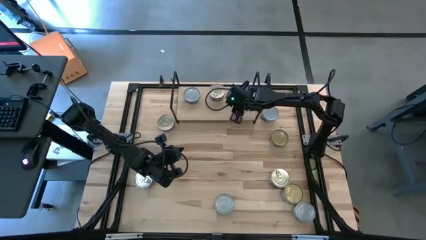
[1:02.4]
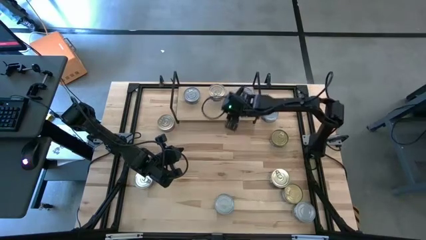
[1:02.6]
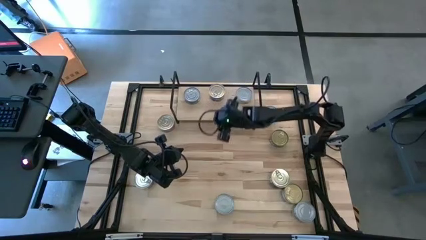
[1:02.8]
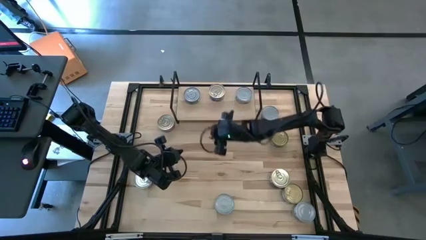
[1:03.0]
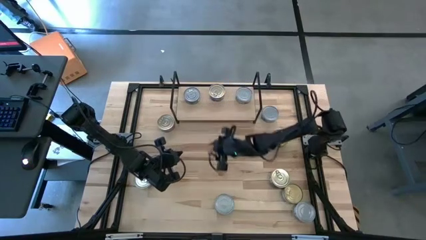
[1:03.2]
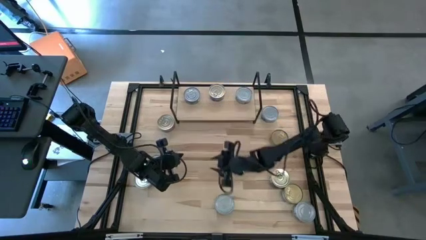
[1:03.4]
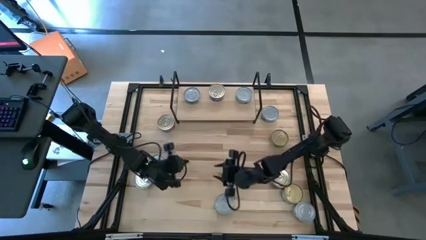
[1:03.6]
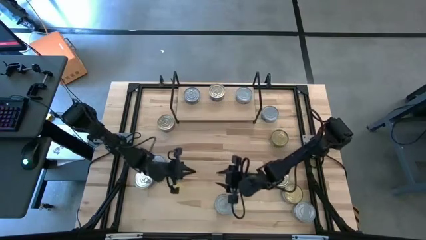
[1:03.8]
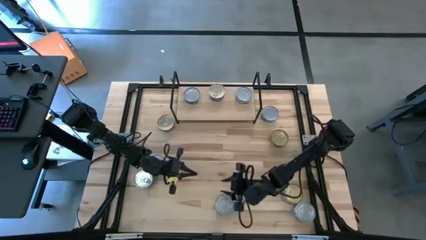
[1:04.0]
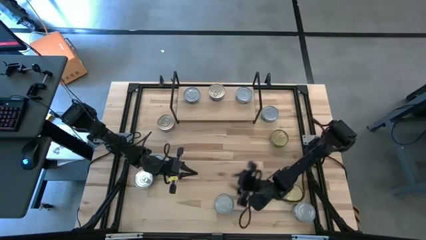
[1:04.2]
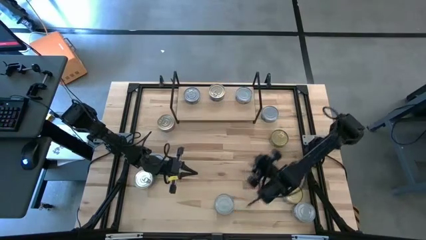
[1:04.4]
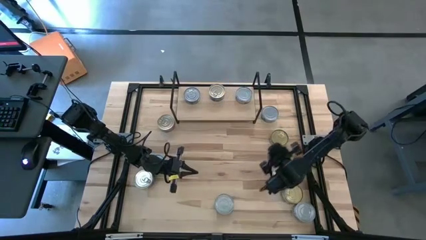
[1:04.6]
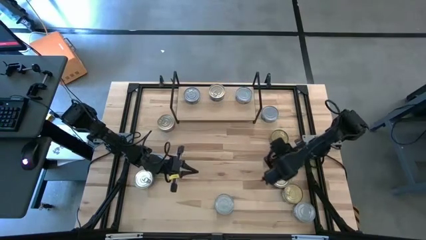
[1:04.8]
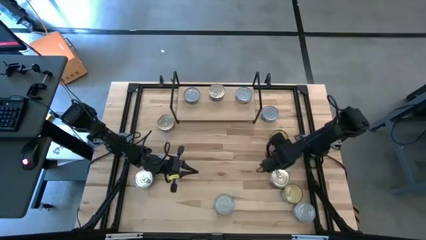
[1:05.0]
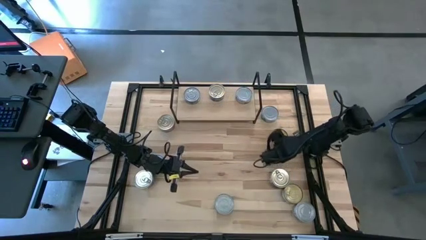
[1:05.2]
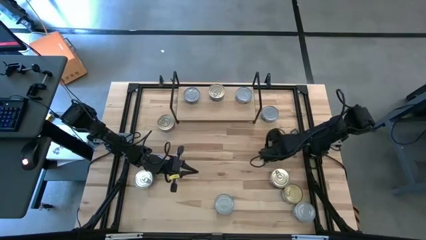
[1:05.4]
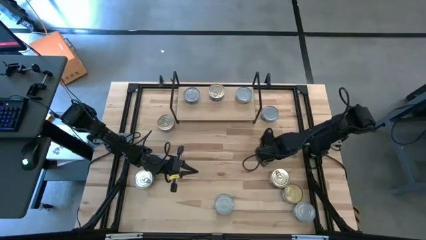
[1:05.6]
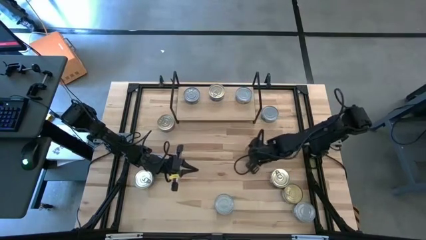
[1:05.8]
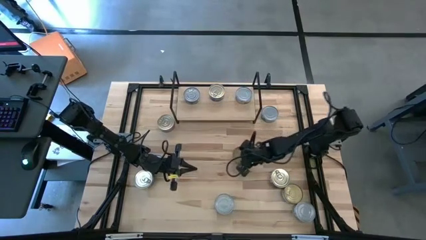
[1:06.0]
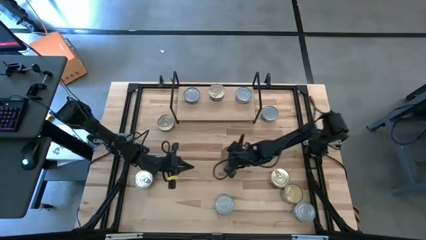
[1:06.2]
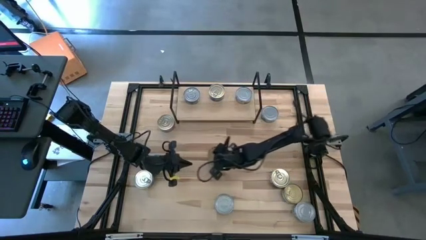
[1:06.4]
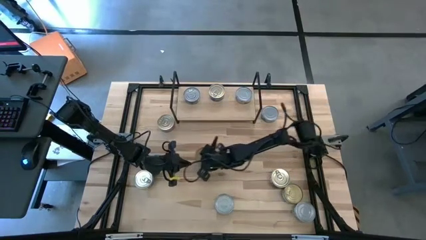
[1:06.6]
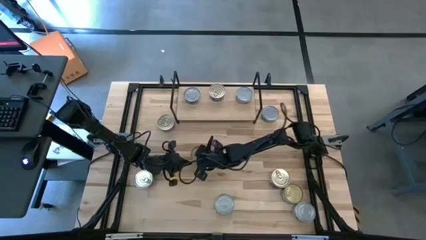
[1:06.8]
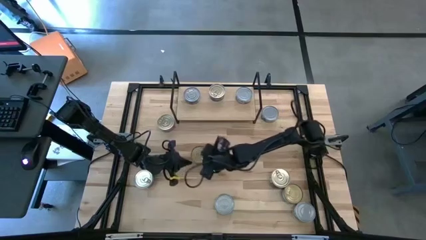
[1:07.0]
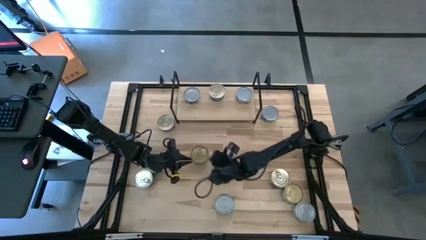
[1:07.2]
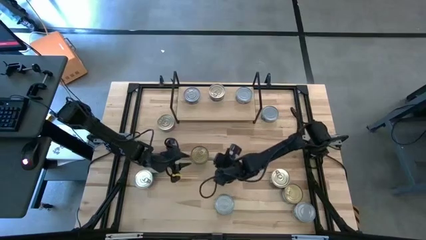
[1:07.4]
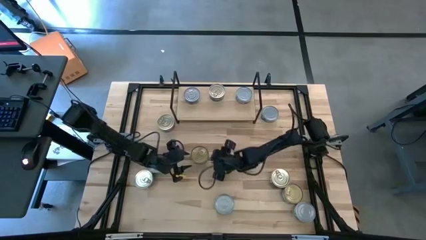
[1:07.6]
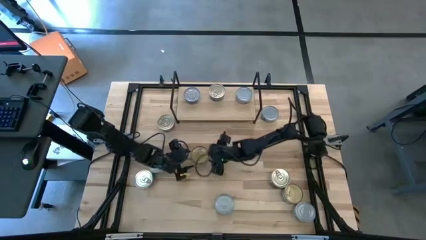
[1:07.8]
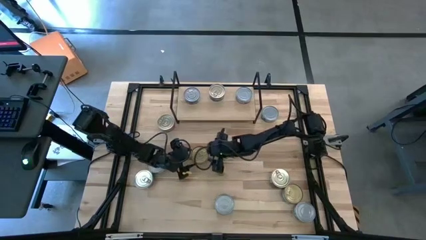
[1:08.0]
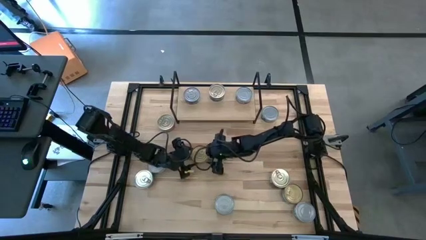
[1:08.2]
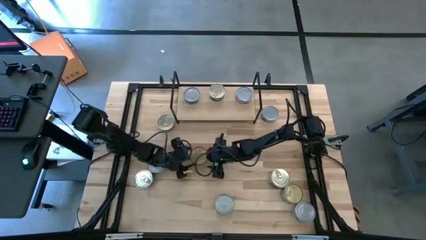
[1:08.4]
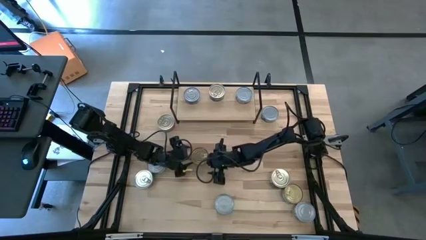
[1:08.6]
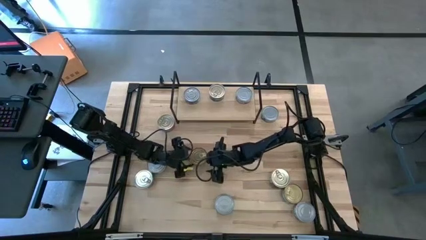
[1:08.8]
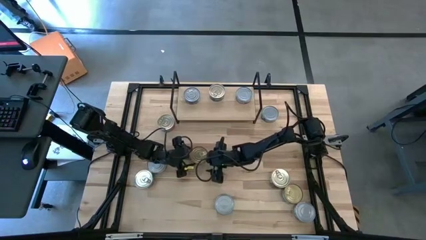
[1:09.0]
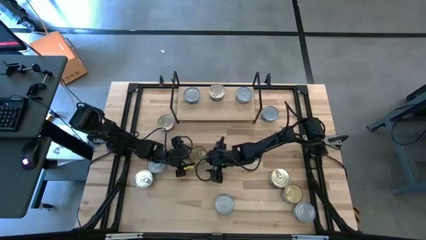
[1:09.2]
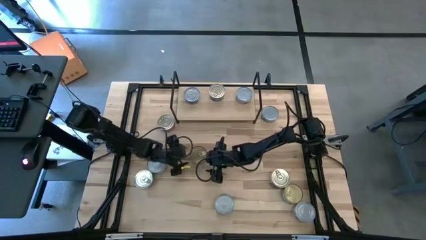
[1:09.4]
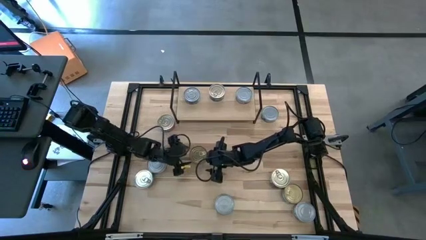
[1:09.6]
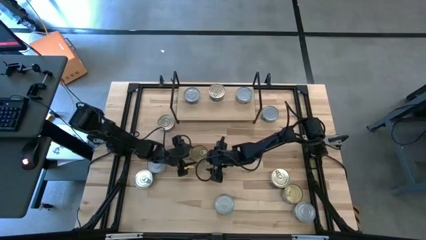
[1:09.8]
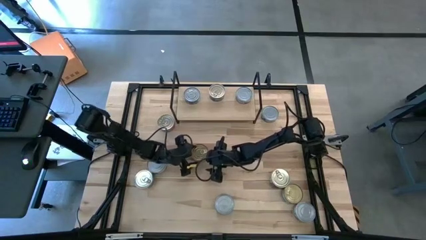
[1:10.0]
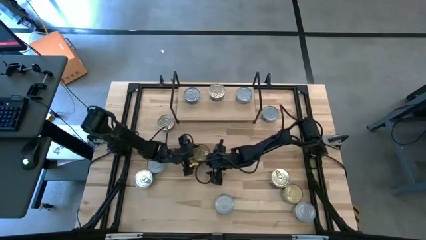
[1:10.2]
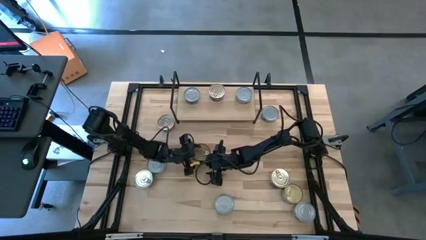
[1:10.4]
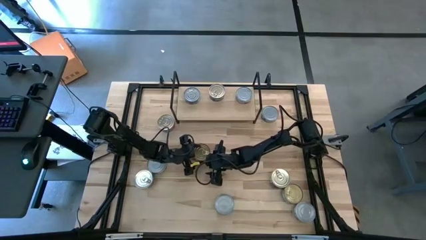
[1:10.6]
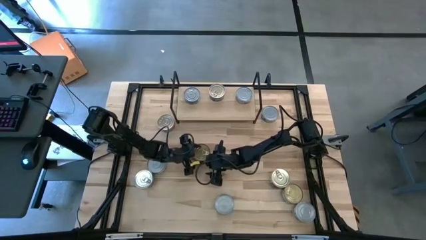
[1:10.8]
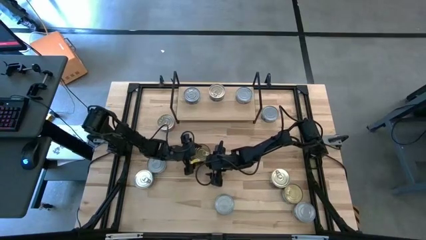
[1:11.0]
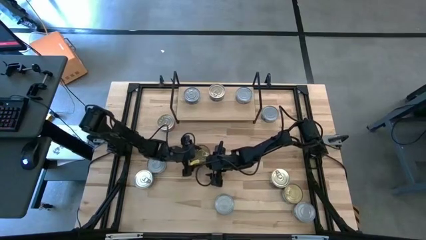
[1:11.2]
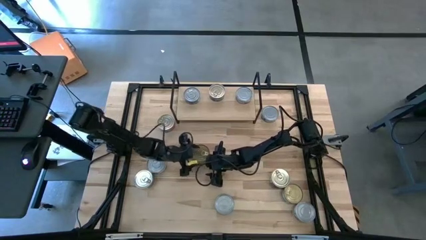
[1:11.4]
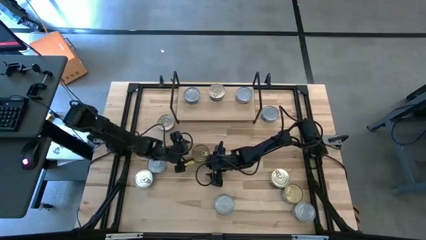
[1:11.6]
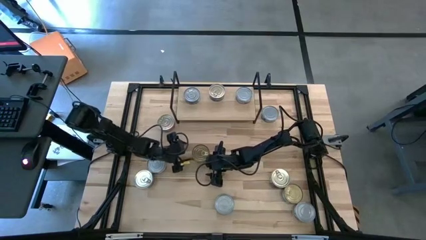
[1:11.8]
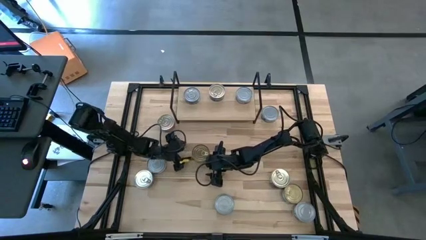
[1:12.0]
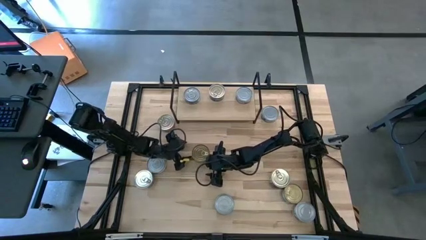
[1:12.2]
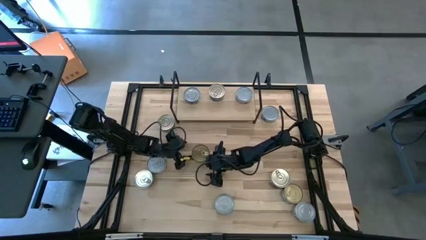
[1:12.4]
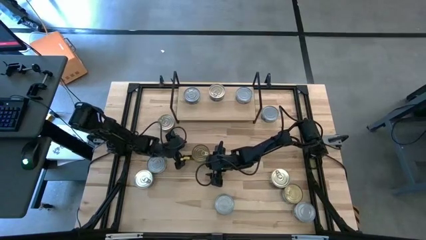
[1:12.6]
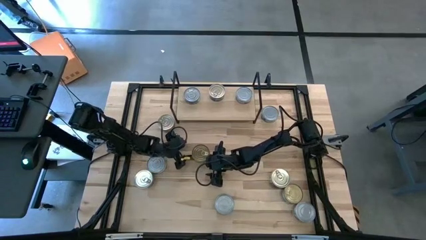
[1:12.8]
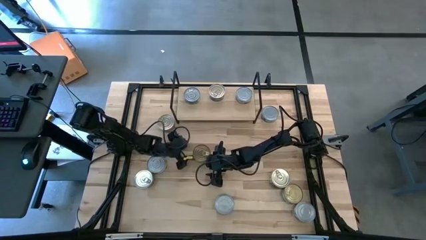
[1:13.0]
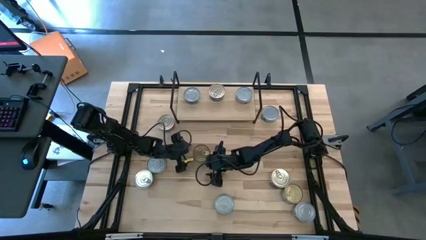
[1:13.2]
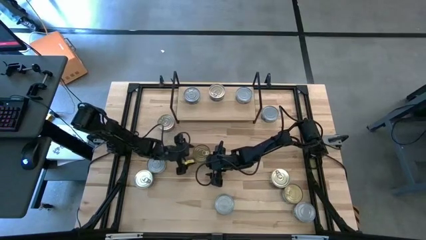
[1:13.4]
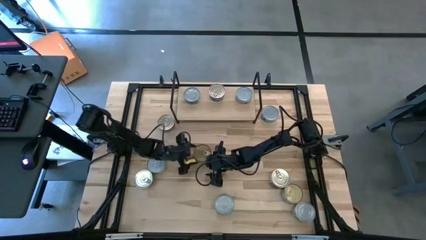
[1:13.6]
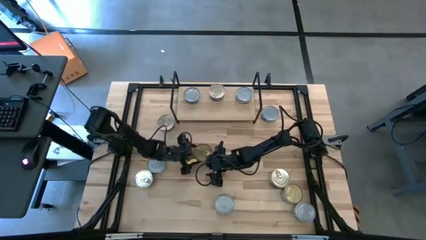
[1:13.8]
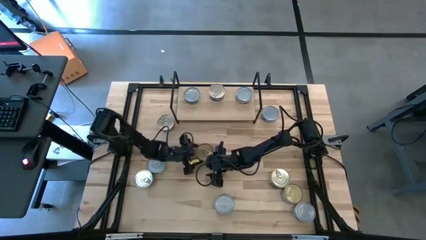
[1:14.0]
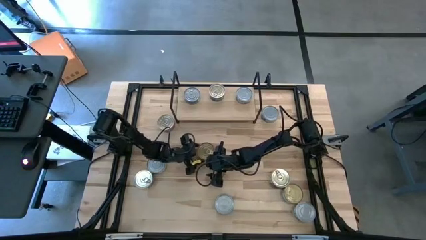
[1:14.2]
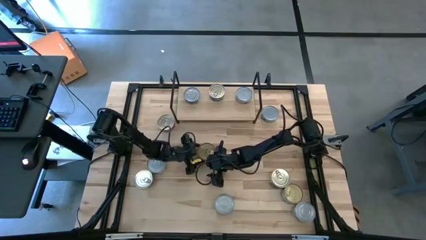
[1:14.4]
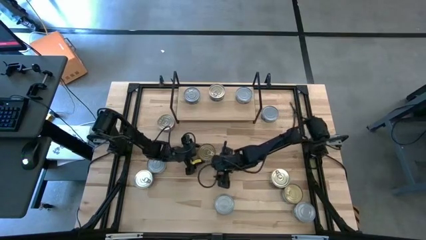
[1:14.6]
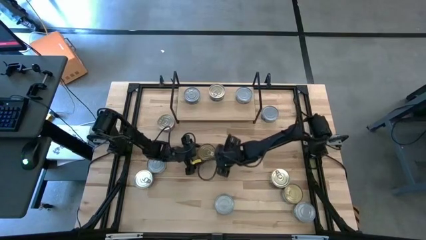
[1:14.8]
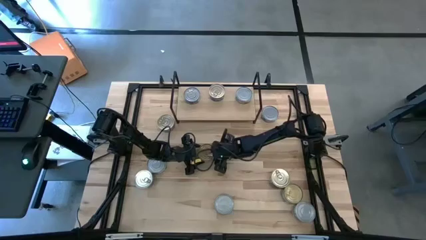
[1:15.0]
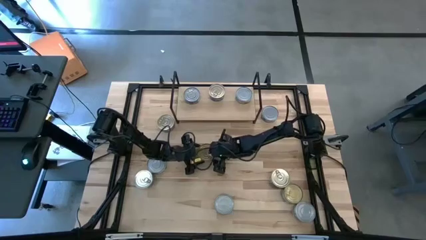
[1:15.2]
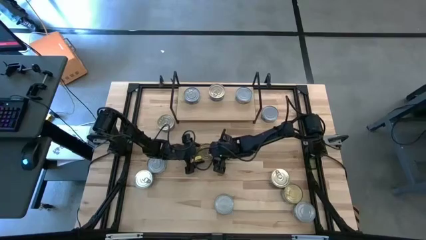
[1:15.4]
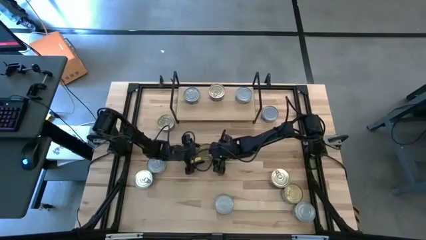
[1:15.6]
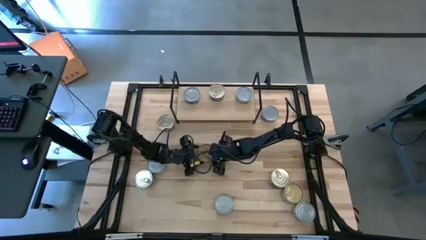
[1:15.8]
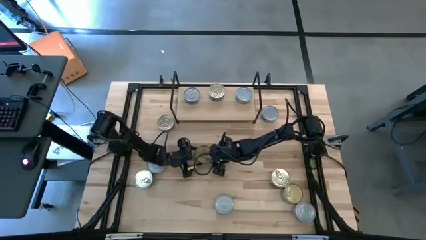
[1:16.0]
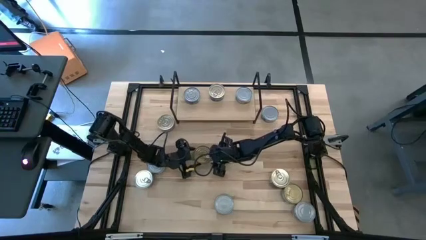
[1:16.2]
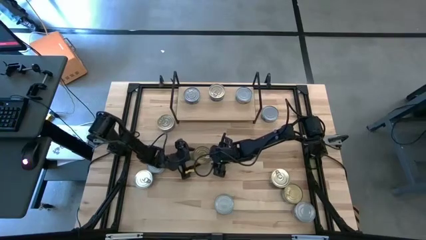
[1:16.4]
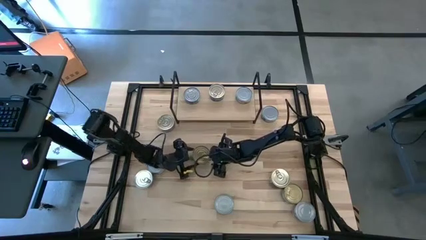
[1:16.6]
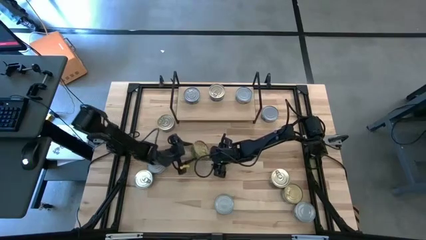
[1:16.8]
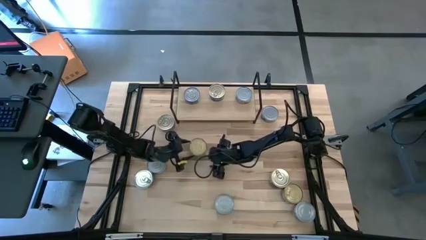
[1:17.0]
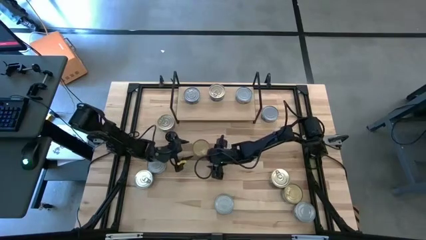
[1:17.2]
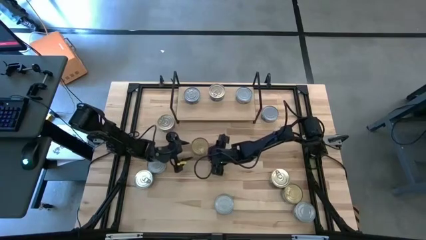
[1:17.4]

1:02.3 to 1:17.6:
Task: Stack canned seafood by type on shelf
Put the top right green and blue tuna can on the shelf

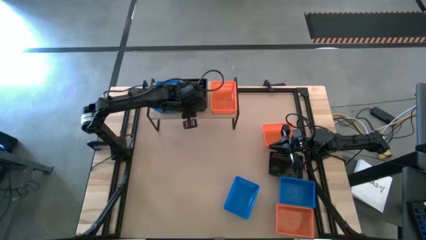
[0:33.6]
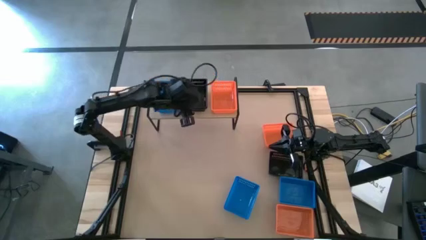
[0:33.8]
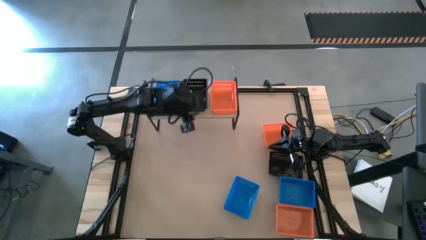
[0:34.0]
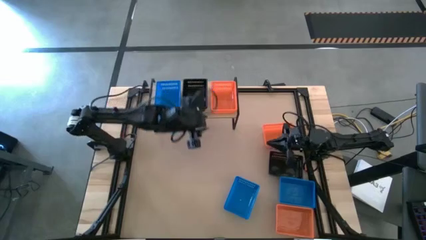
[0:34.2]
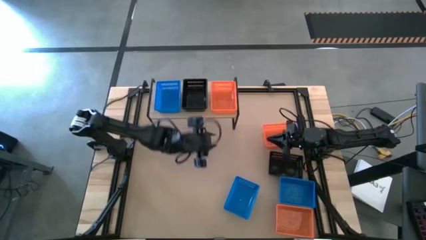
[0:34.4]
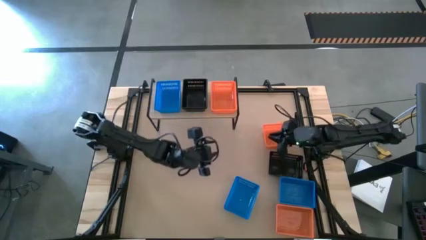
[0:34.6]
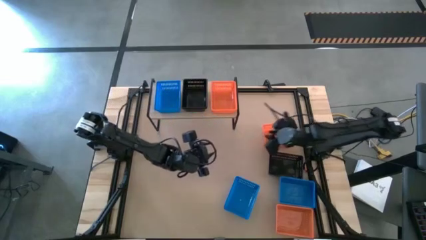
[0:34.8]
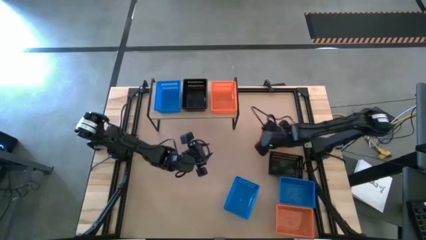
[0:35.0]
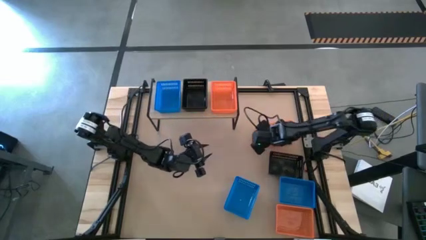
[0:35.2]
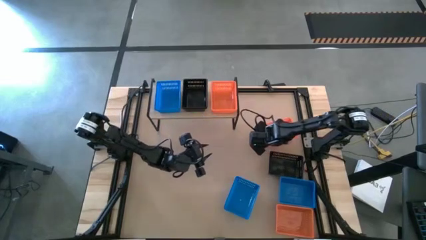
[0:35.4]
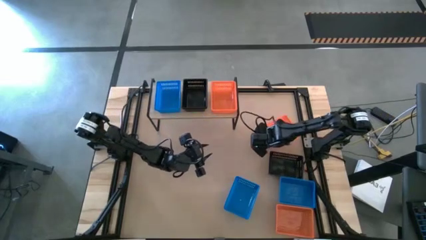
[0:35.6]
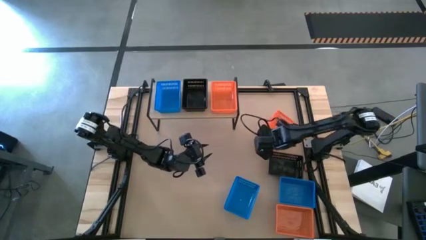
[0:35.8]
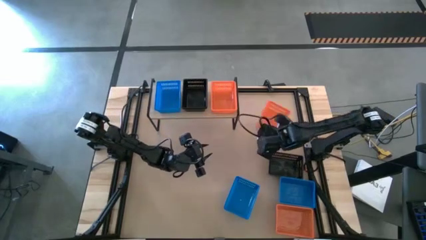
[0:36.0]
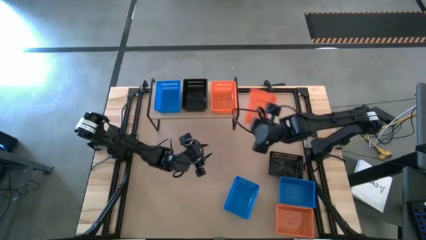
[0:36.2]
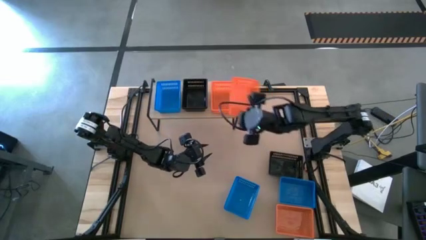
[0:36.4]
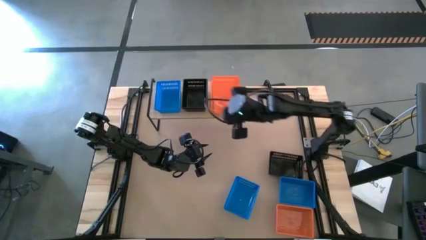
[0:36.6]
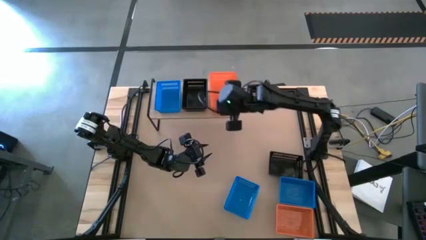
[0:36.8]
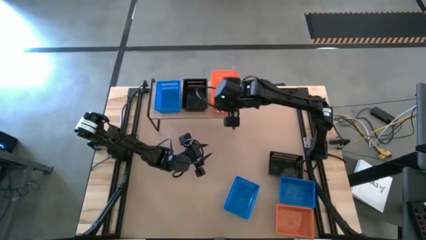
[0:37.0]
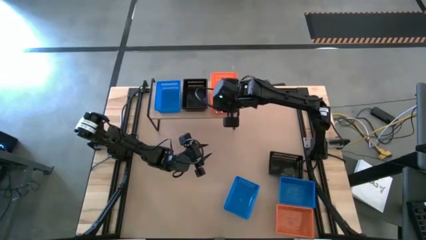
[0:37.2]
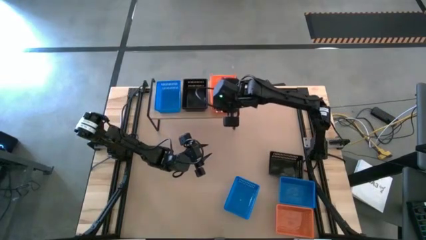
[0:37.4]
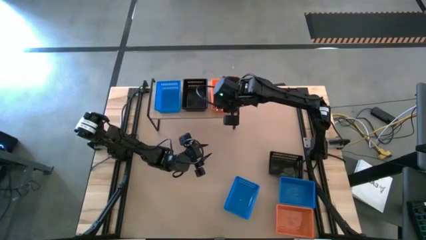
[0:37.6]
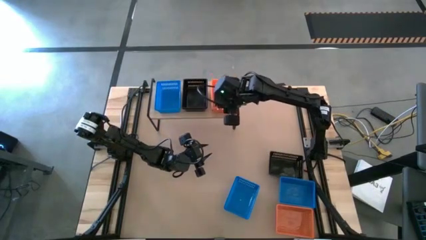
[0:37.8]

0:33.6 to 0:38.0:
Task: Stack baskets on shelf by color
Stack the top orange basket on top of the orange basket on shelf
